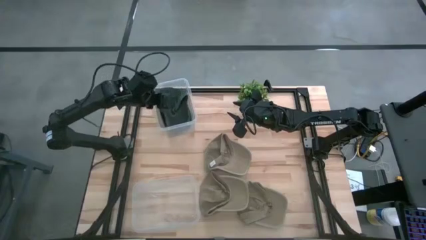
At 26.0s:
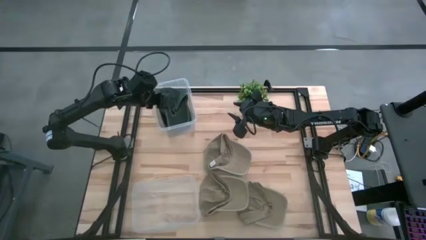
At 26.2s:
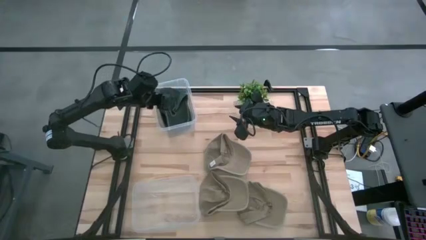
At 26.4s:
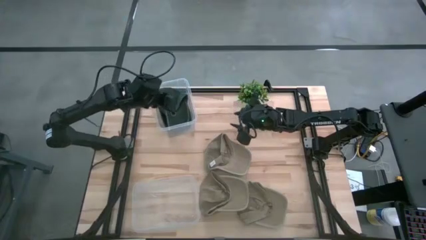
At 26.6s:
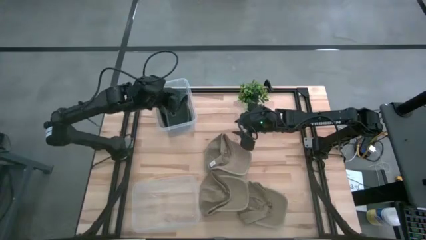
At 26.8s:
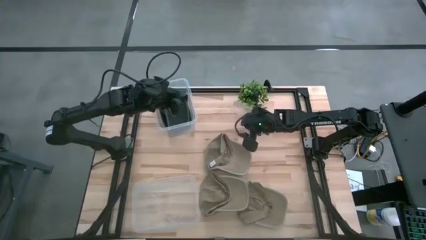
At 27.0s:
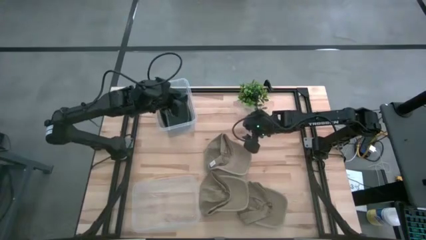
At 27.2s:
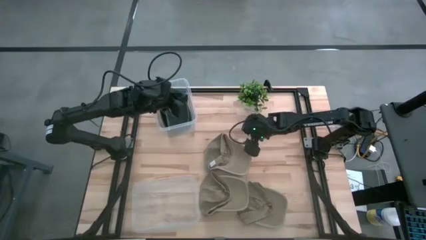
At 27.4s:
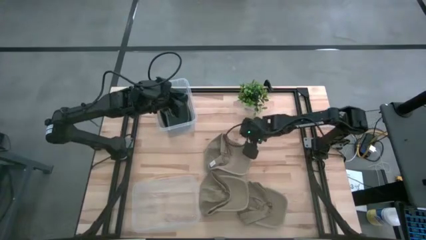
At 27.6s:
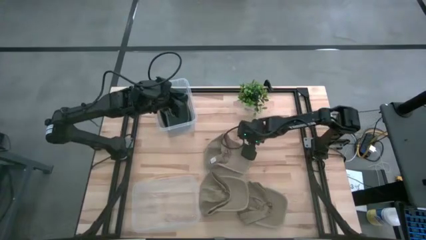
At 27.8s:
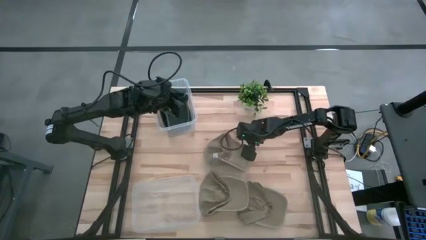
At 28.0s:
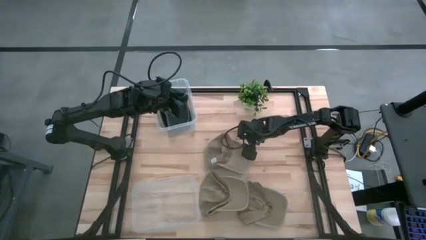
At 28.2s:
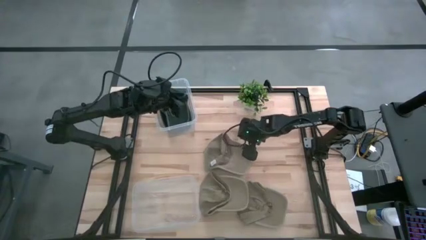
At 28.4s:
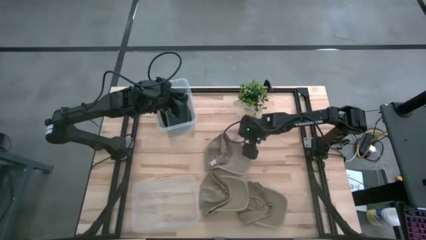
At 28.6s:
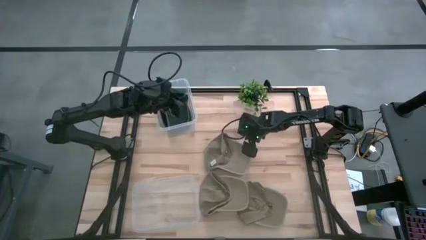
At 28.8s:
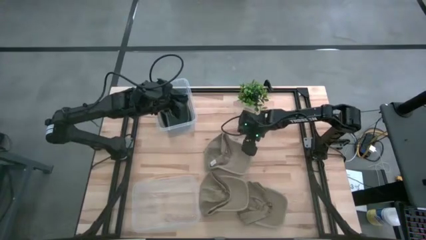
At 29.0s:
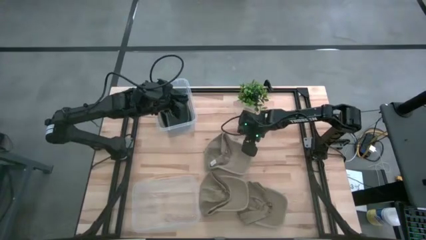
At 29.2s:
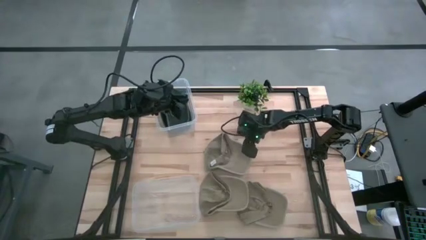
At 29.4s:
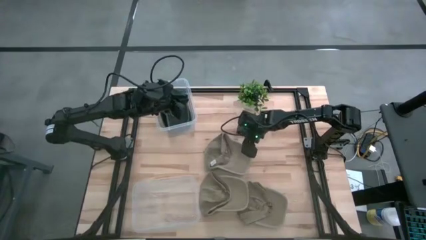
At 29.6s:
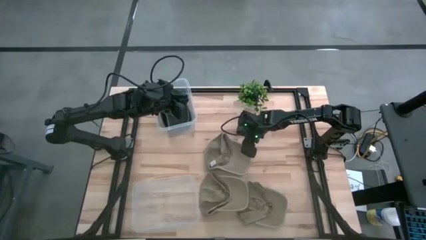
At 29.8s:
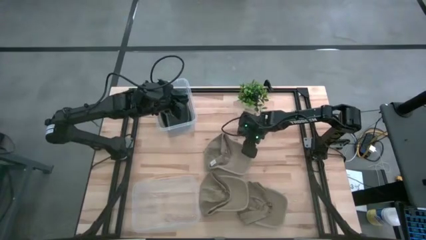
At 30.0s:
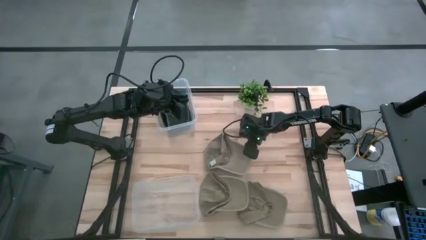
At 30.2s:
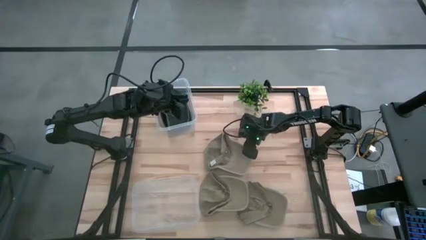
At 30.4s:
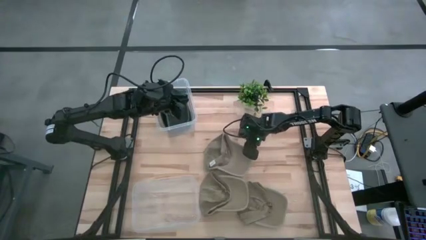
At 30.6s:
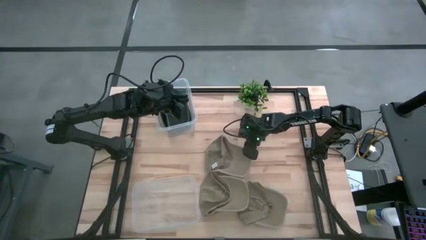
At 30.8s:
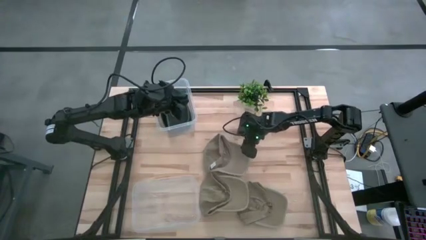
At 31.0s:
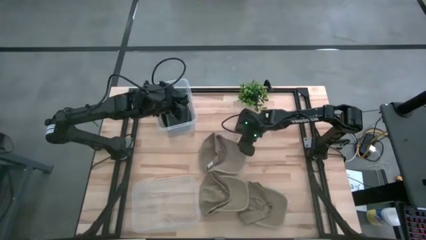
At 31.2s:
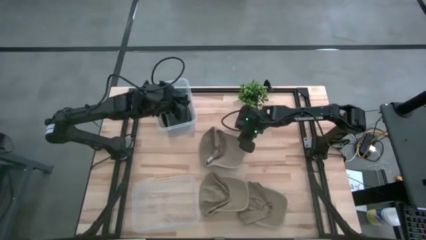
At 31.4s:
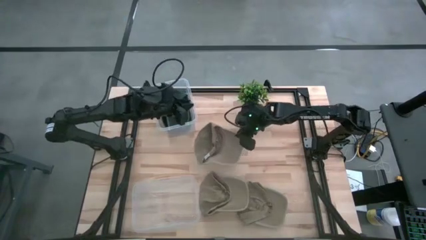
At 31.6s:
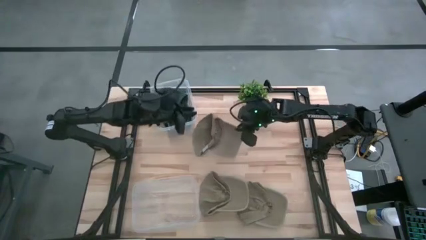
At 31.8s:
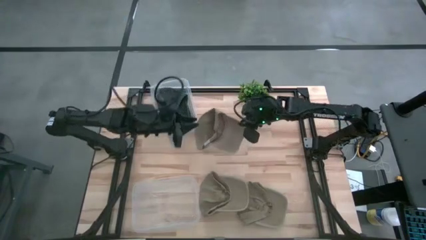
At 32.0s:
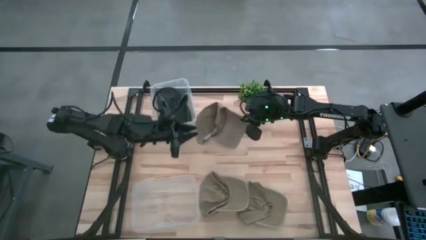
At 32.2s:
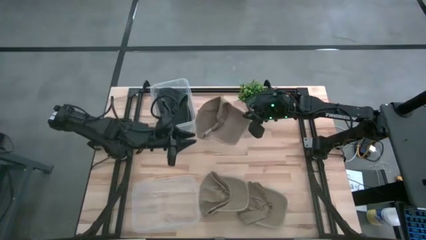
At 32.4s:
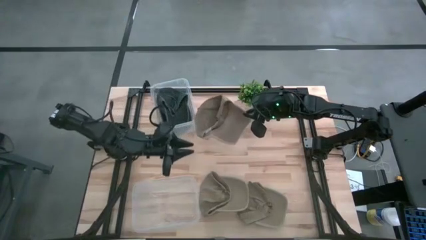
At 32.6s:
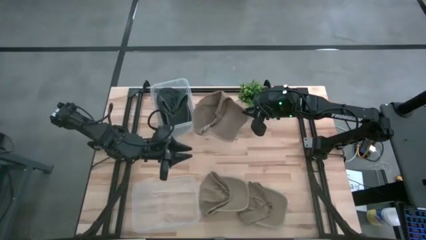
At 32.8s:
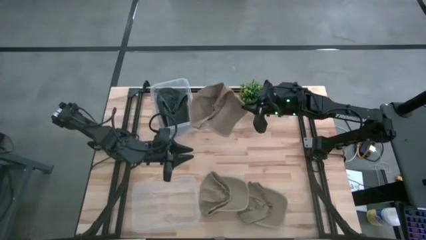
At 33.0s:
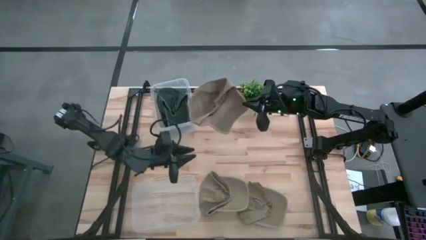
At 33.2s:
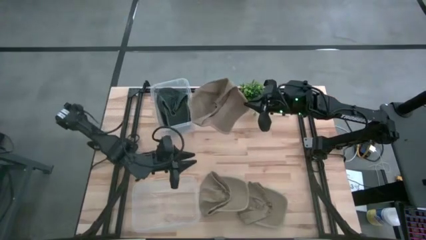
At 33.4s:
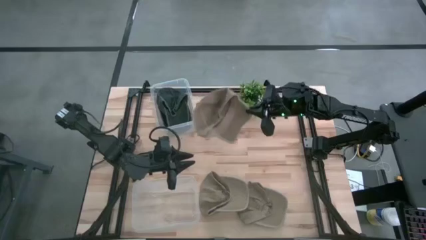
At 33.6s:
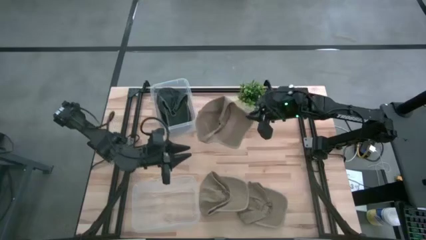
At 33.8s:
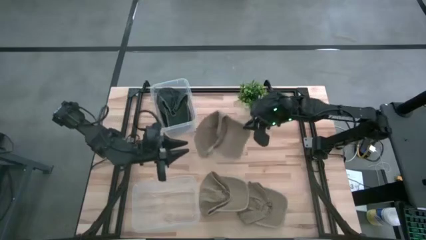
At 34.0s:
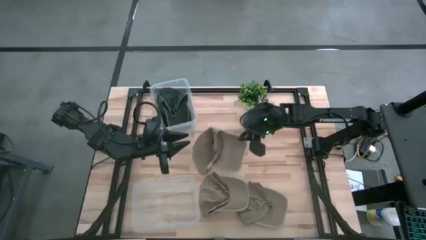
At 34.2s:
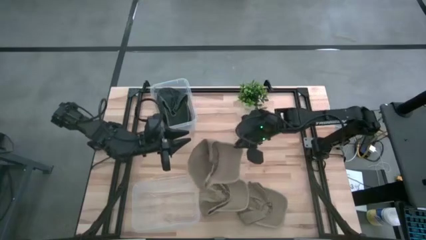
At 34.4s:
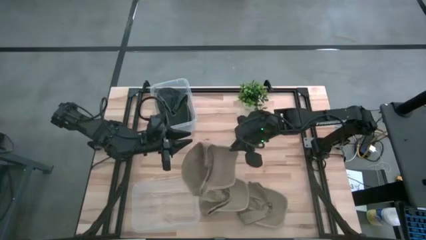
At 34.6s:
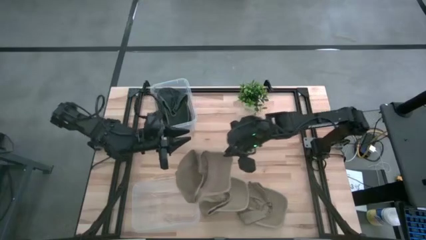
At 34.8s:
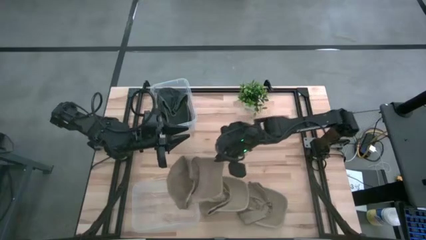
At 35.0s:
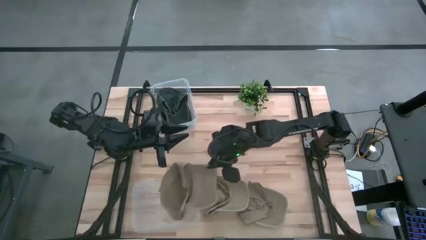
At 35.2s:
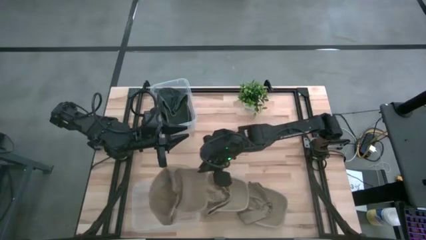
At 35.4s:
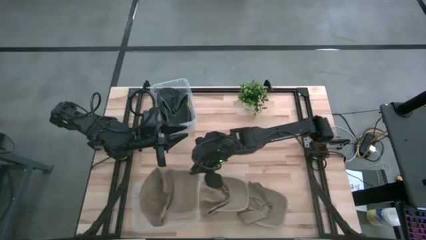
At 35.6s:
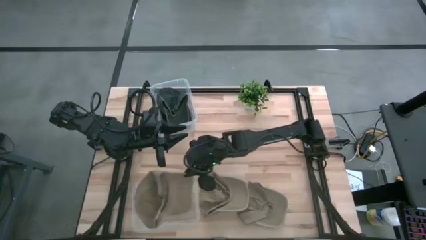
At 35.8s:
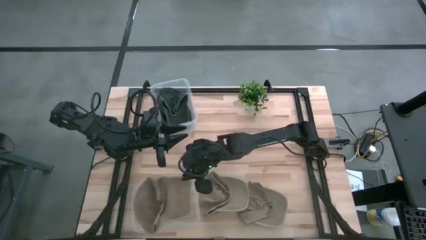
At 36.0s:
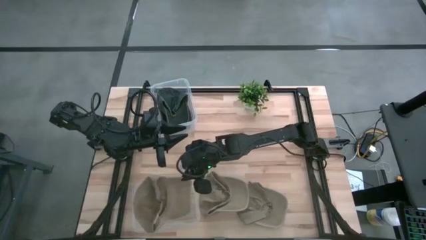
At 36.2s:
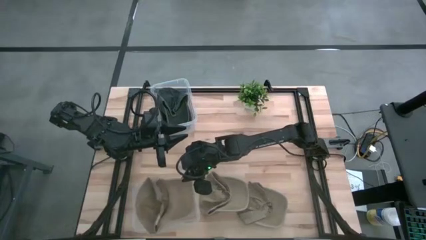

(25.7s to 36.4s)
Task: Pick & Place hat
Put the brown cap into the bottom transparent bin

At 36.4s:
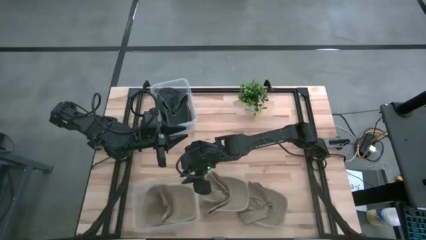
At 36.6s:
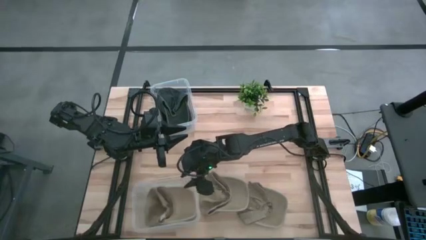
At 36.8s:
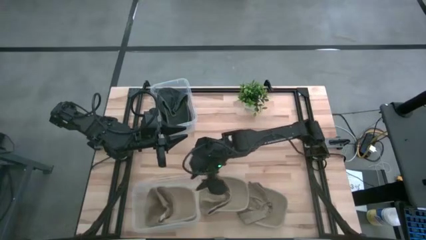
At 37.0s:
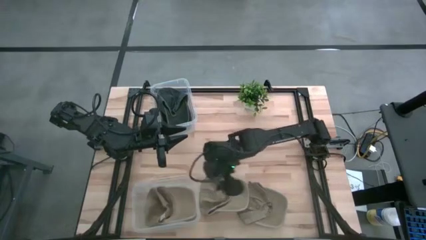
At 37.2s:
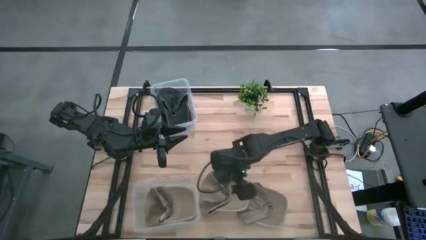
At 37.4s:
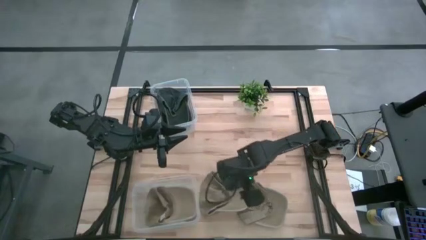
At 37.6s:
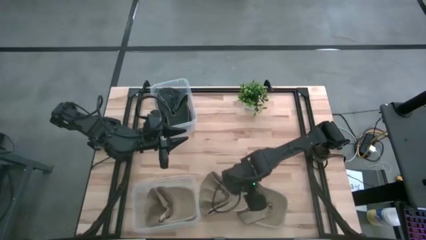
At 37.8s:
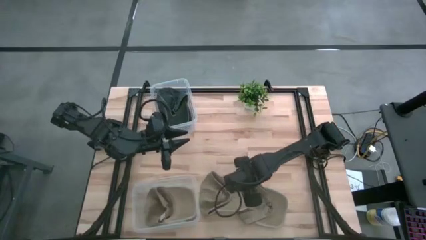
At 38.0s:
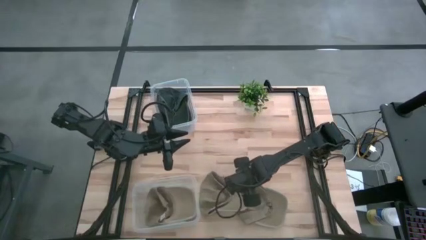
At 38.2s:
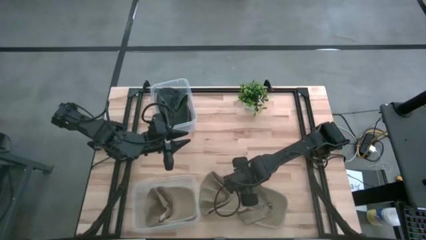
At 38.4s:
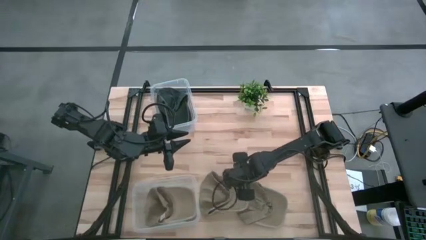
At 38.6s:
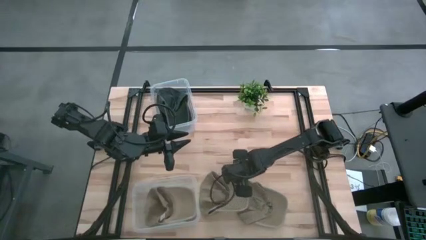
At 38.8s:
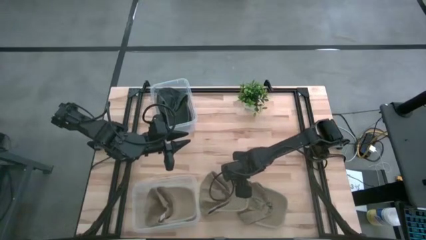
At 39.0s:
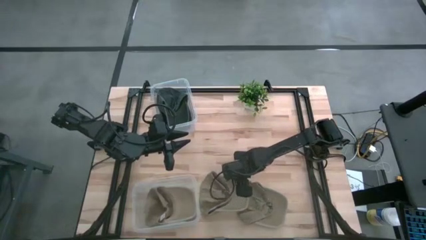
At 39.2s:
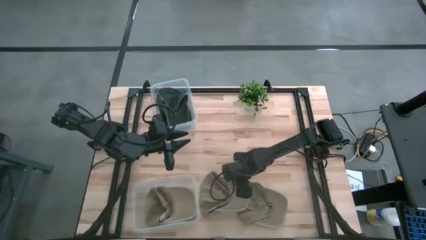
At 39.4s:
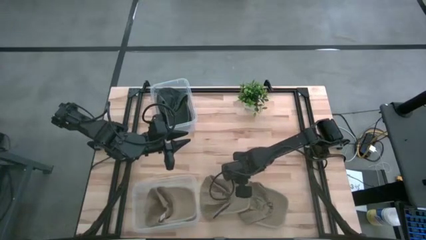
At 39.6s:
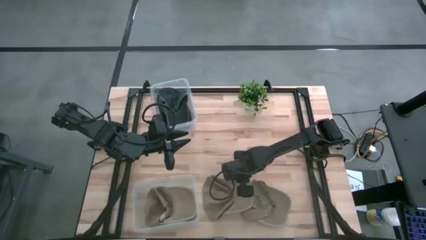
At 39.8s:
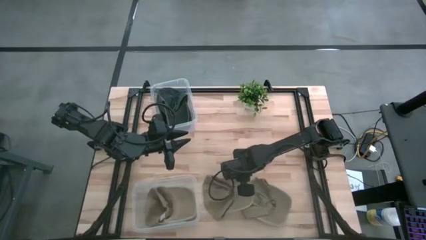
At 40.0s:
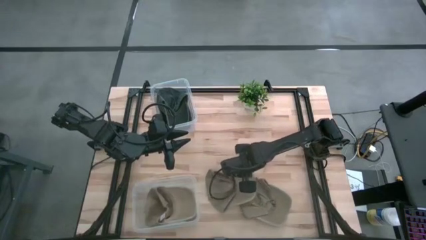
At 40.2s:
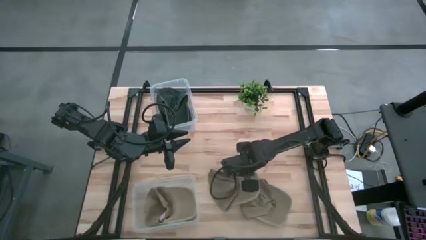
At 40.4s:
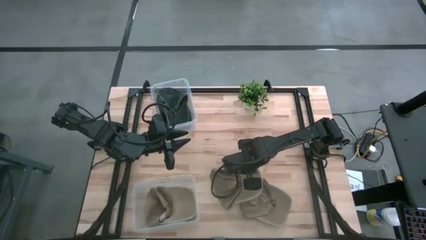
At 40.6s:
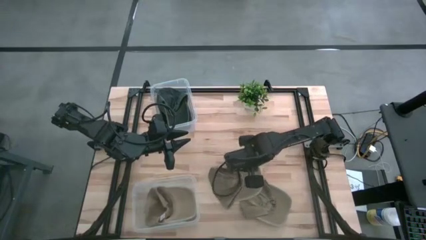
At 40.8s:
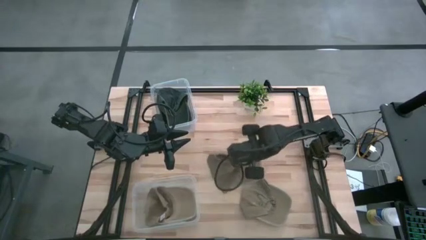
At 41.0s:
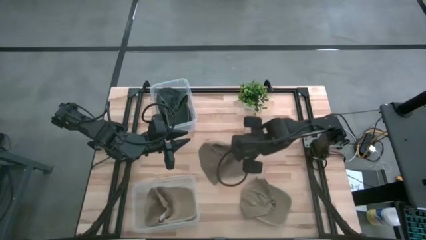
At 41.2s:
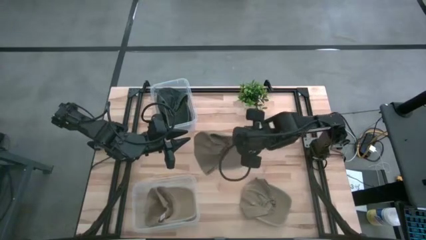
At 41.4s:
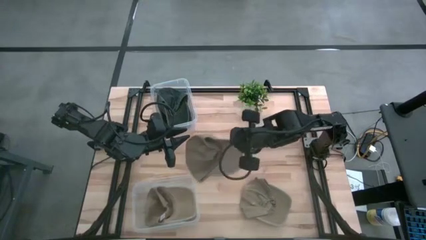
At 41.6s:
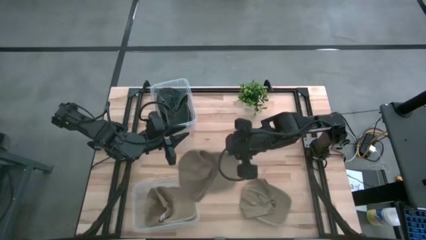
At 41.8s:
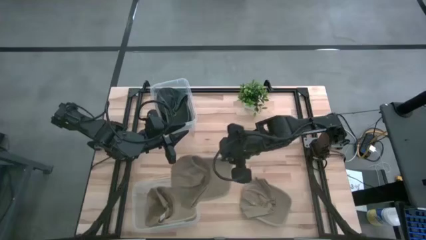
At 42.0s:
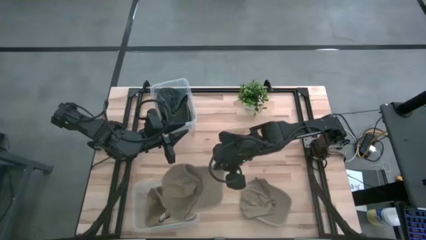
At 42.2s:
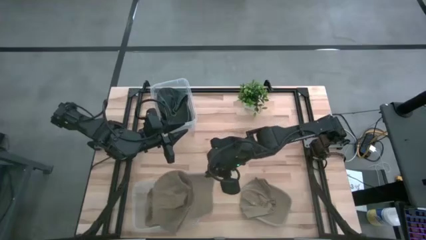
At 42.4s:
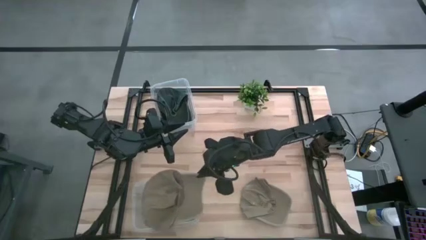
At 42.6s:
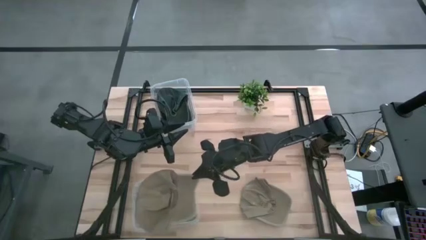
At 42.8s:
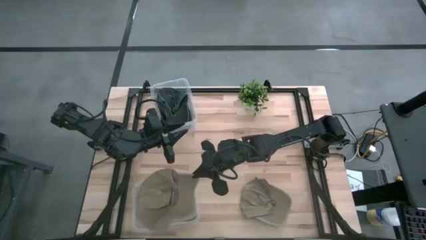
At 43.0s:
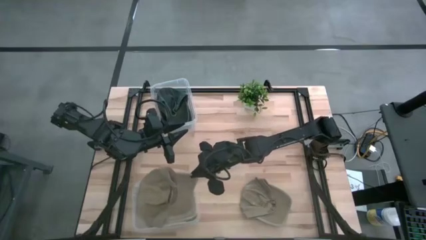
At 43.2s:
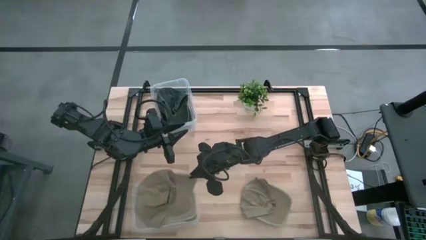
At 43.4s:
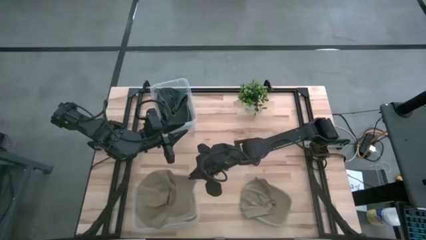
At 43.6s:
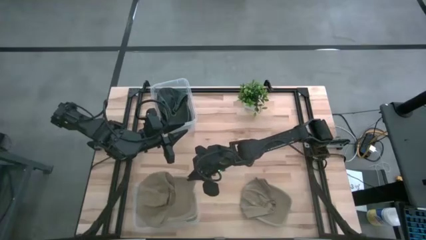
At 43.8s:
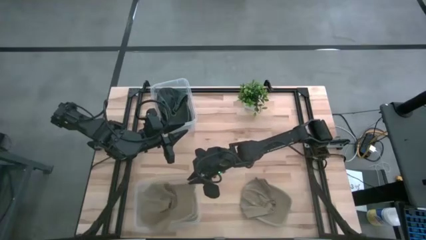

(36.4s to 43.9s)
Put the brown cap into the bottom transparent bin
